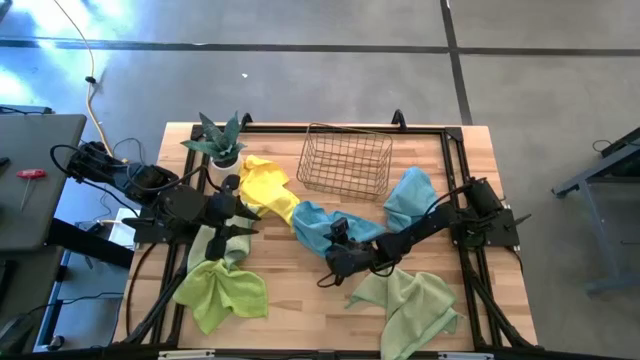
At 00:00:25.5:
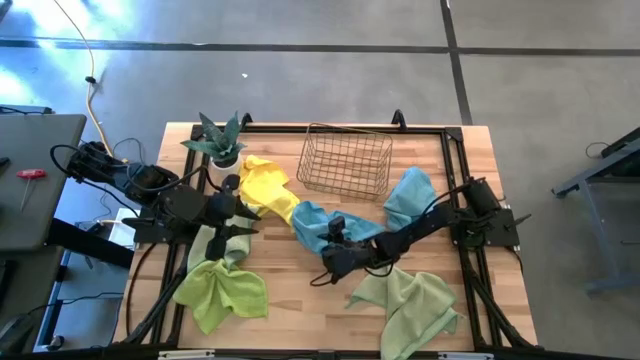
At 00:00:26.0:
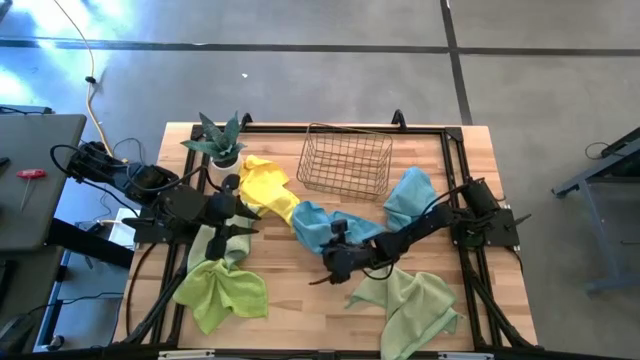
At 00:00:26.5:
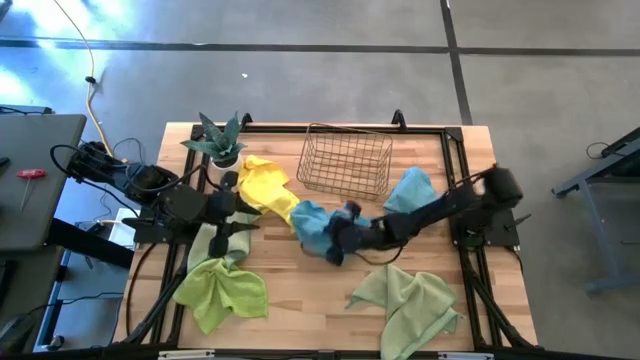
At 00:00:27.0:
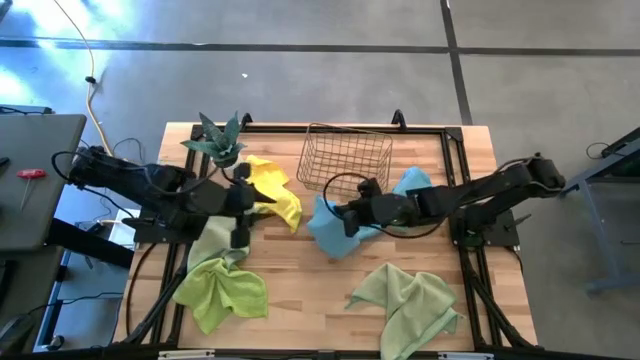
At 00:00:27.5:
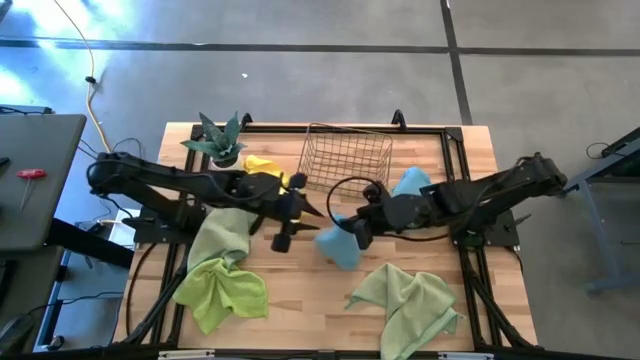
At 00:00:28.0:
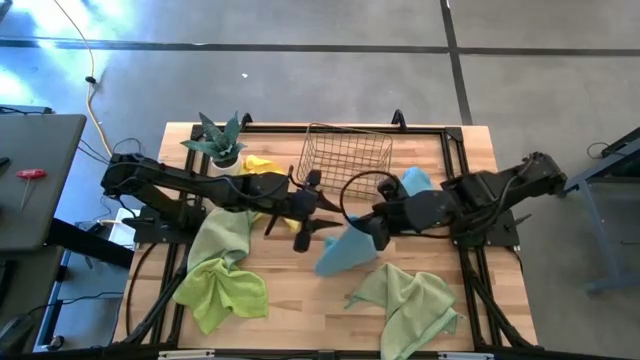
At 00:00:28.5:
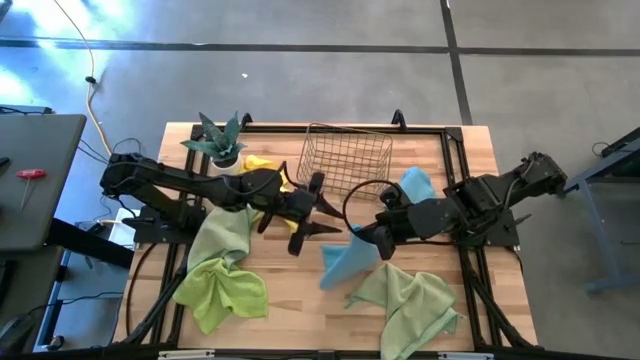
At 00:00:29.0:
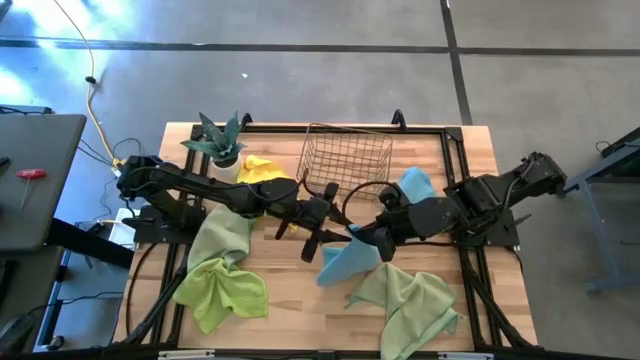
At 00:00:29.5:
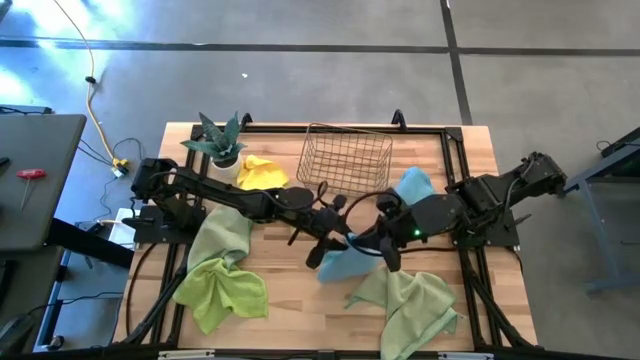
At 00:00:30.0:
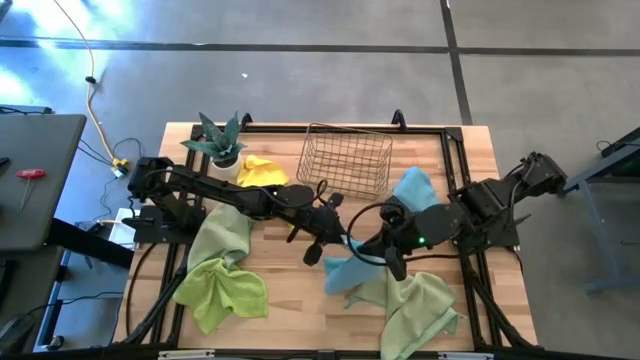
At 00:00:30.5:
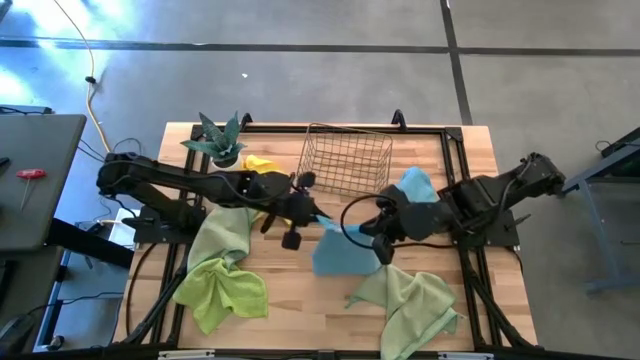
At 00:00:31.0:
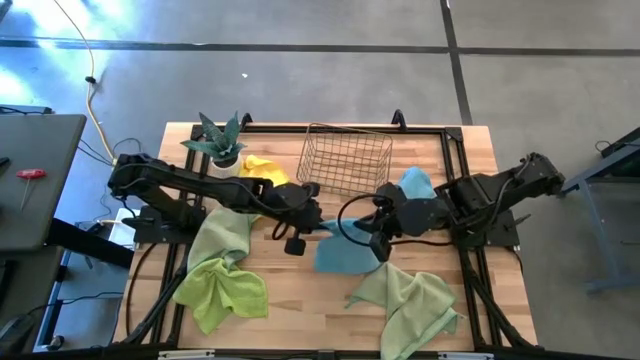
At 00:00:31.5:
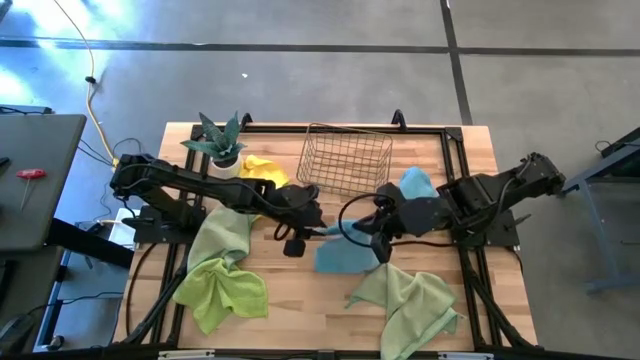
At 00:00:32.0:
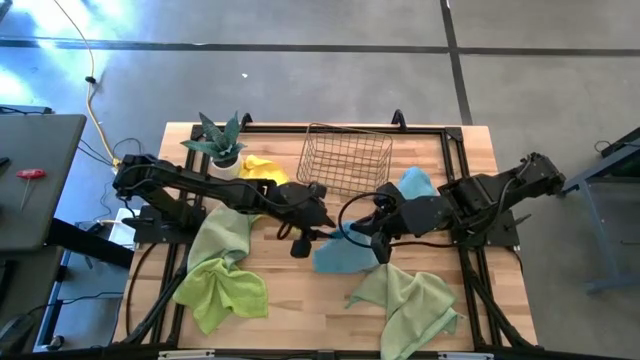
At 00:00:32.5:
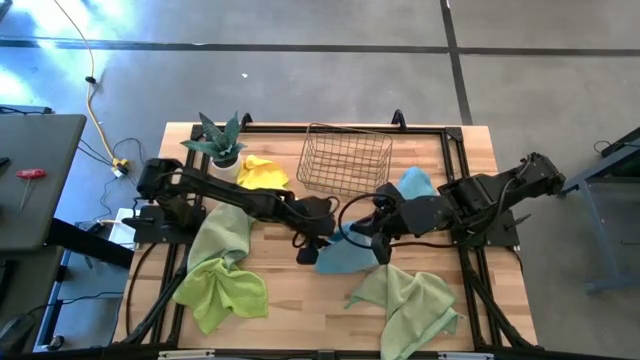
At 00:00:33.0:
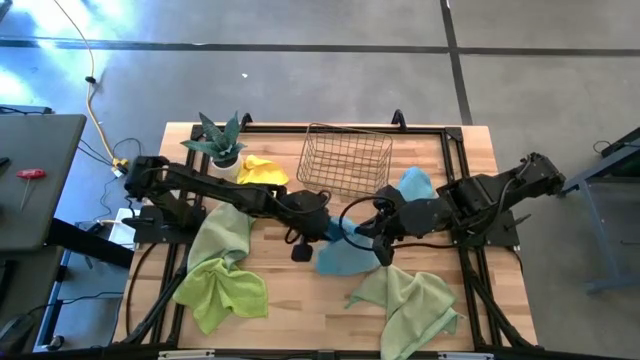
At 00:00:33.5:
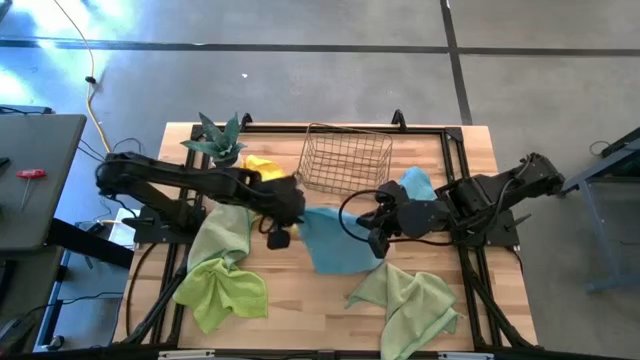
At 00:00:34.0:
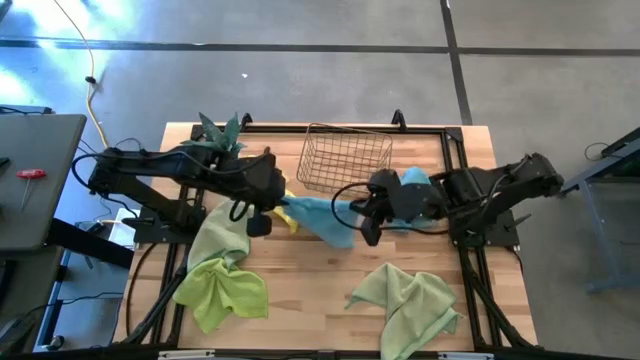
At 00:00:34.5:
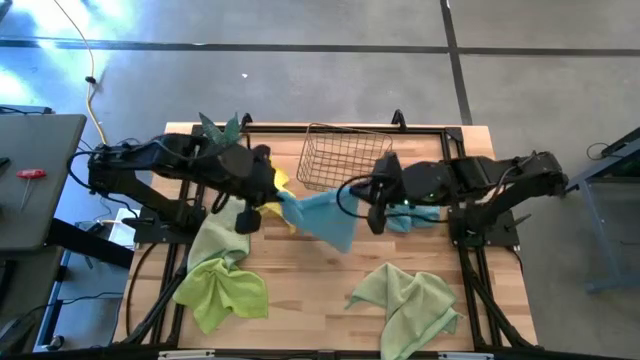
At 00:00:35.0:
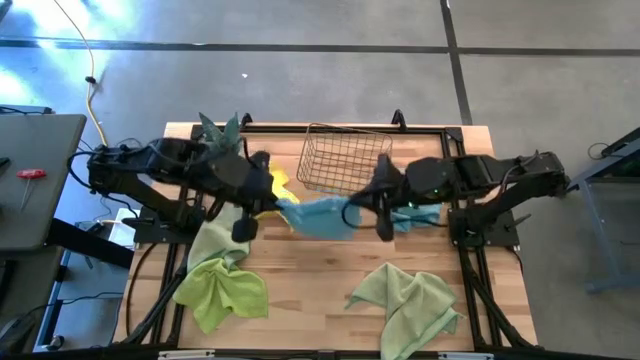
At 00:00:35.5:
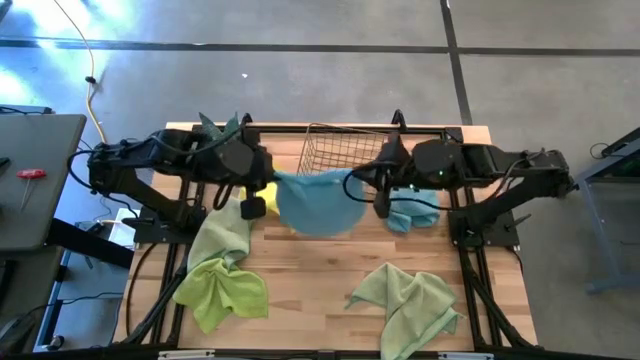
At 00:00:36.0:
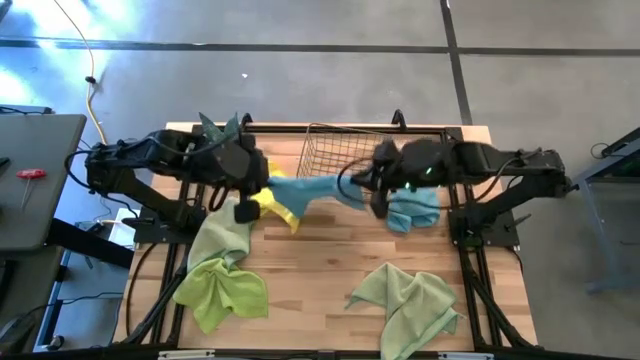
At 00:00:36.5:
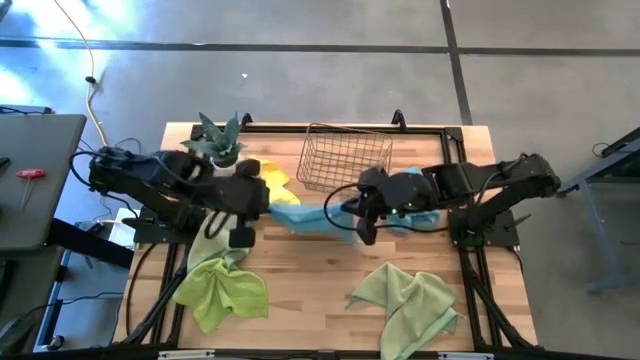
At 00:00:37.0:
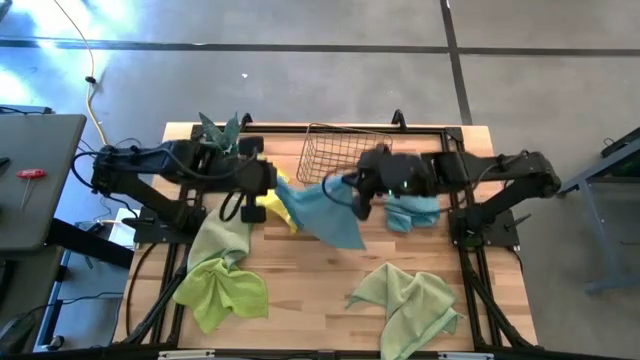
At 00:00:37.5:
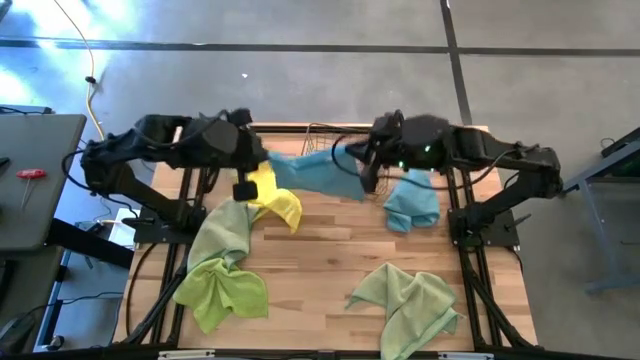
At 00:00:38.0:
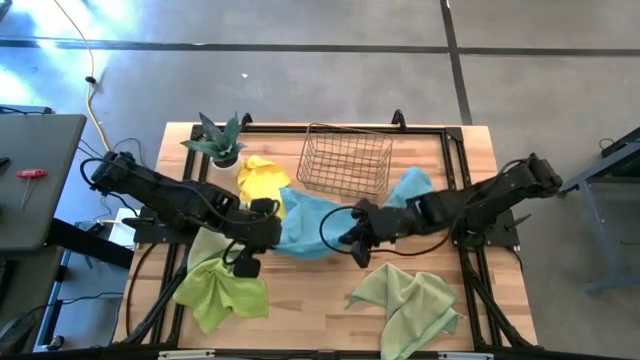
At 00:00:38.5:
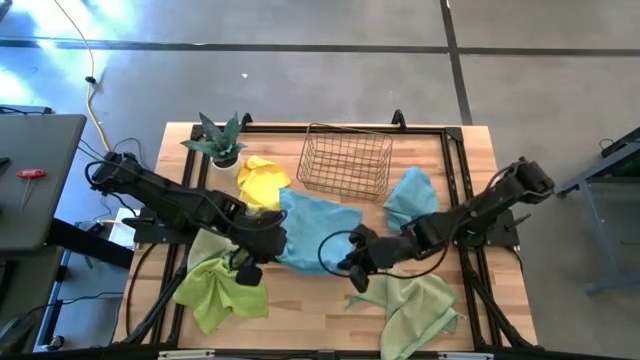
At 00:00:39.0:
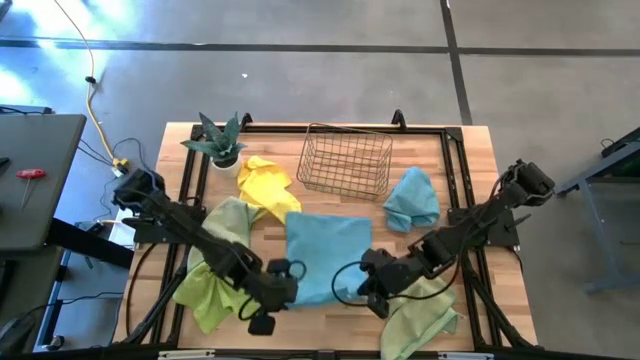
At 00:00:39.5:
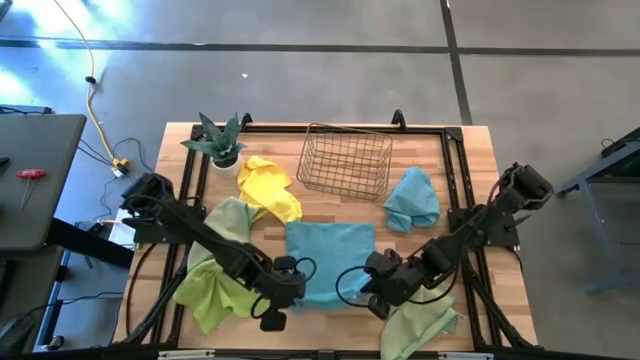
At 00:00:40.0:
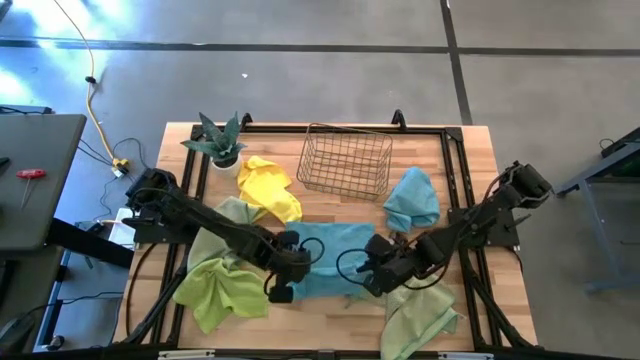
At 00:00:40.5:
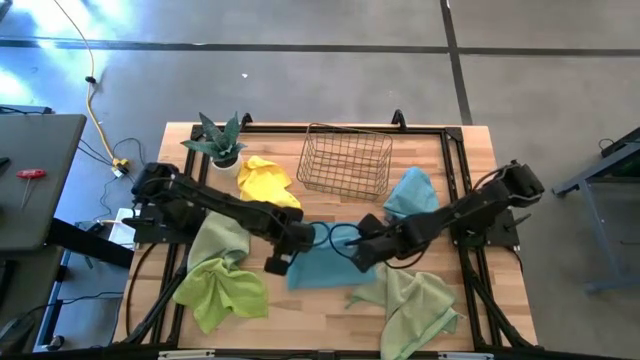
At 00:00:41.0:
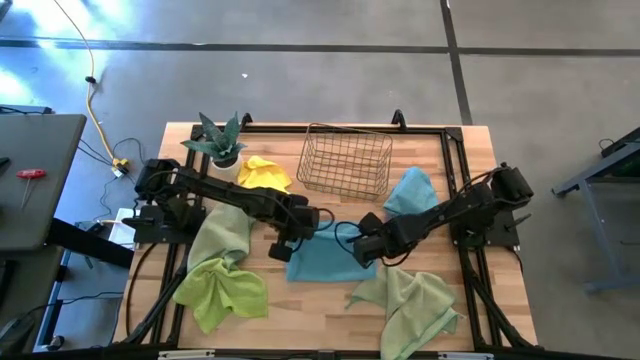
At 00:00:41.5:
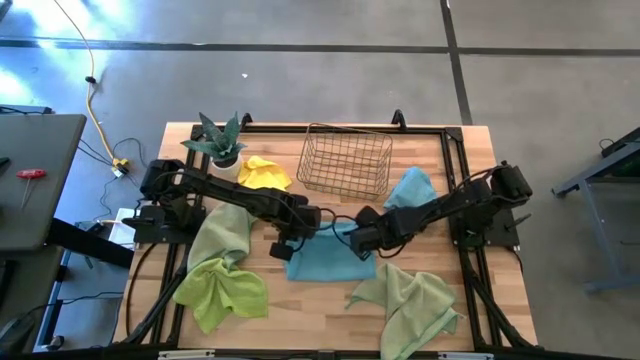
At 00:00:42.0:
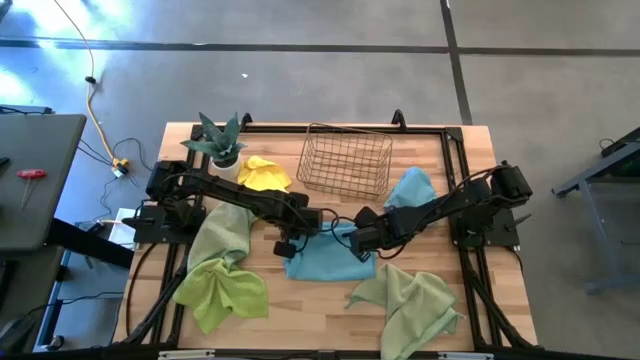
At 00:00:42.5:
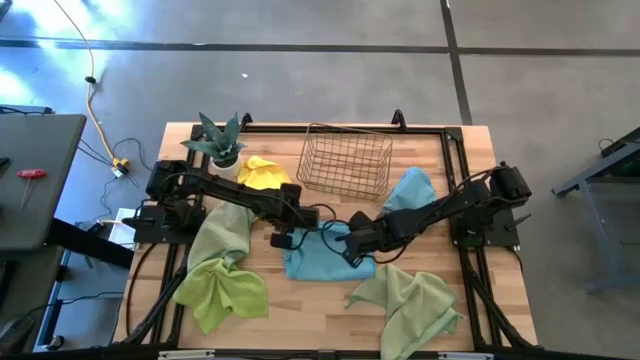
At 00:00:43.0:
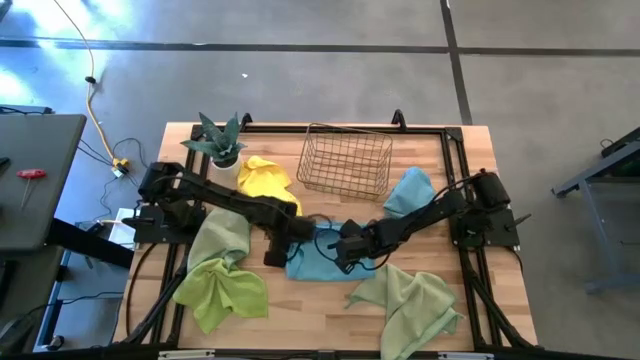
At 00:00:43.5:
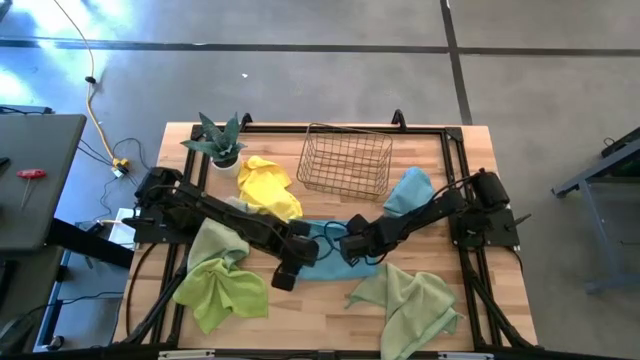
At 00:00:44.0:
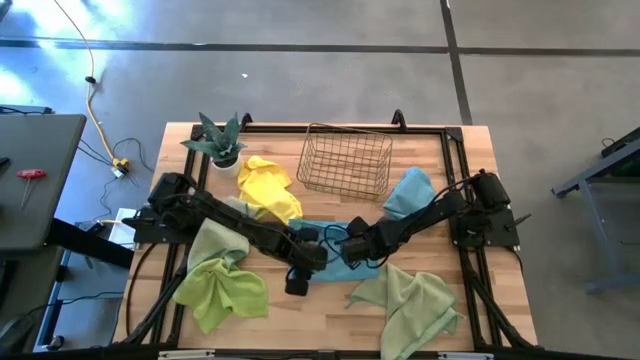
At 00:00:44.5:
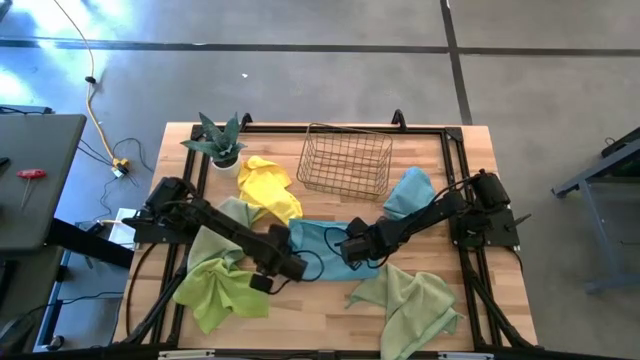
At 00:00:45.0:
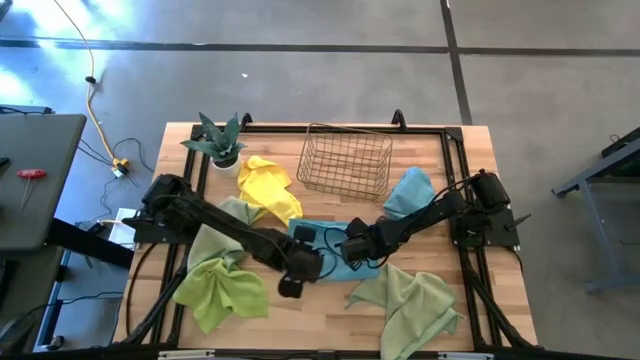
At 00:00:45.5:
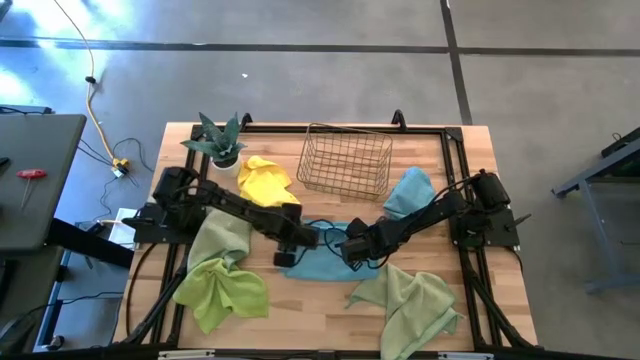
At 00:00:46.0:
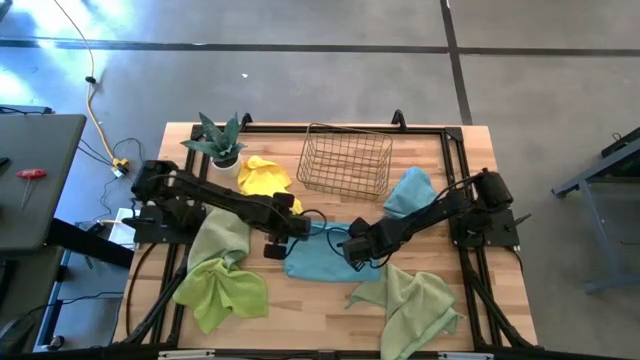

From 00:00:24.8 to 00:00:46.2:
Task: Fold microfiber towels
Fold the bottom blue microfiber cloth
